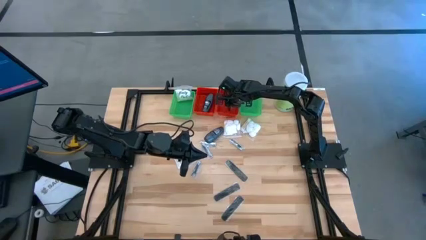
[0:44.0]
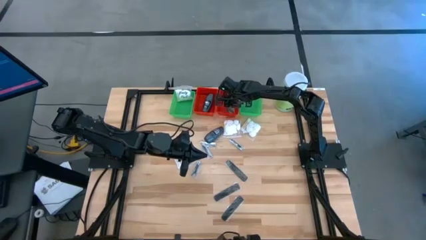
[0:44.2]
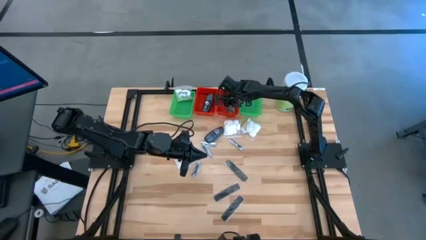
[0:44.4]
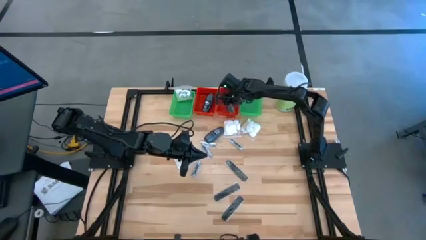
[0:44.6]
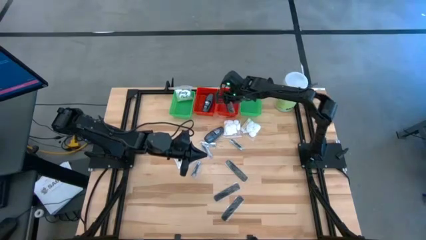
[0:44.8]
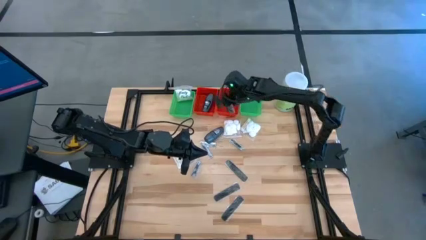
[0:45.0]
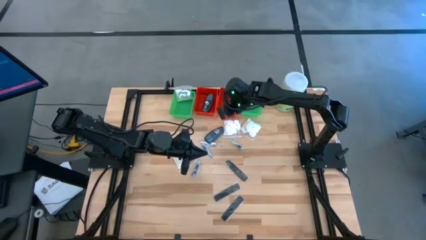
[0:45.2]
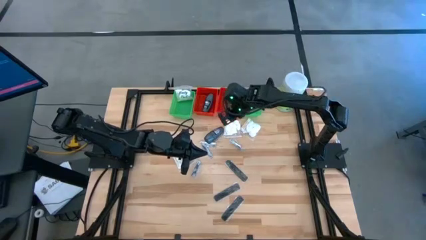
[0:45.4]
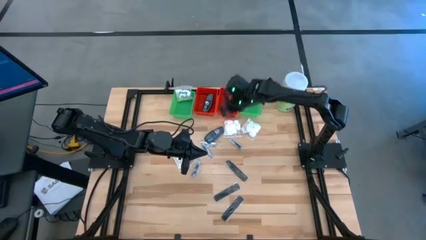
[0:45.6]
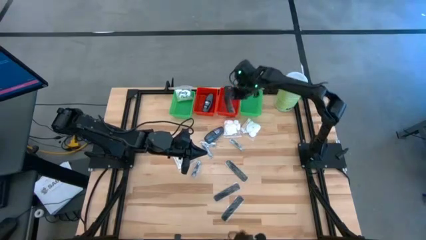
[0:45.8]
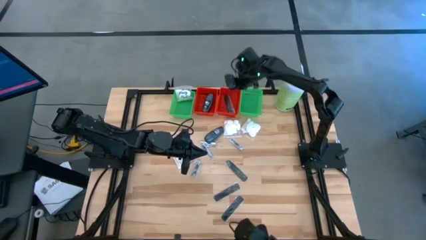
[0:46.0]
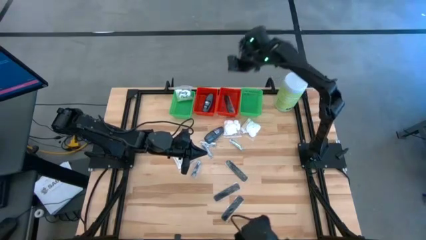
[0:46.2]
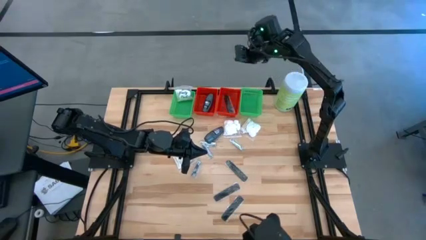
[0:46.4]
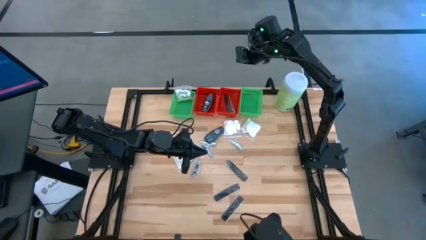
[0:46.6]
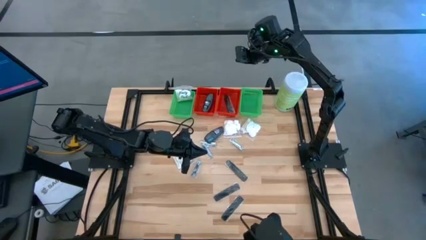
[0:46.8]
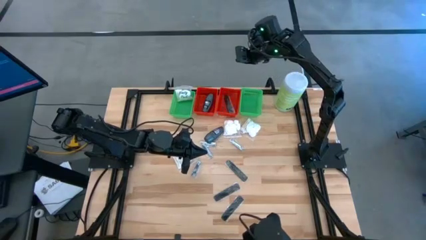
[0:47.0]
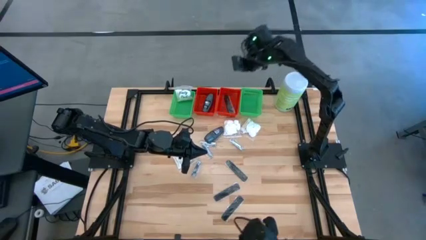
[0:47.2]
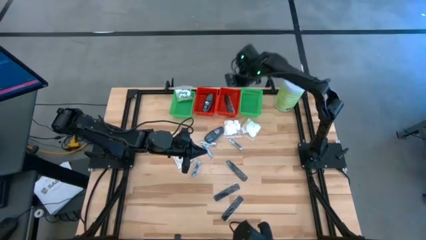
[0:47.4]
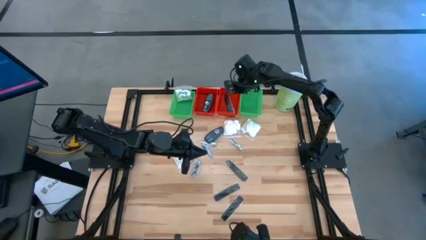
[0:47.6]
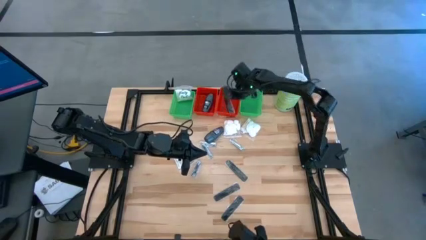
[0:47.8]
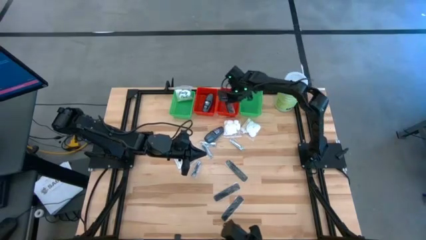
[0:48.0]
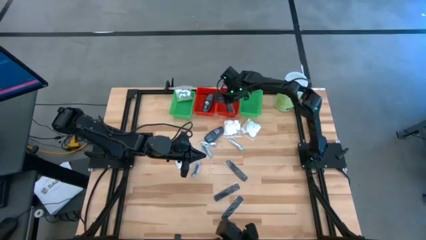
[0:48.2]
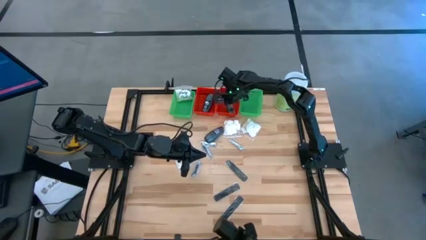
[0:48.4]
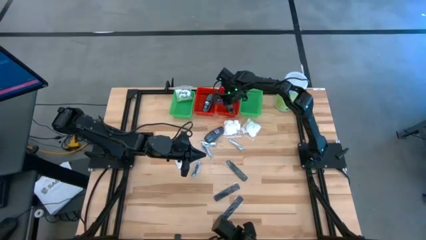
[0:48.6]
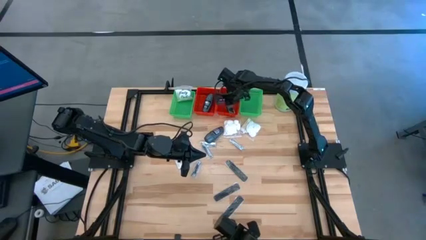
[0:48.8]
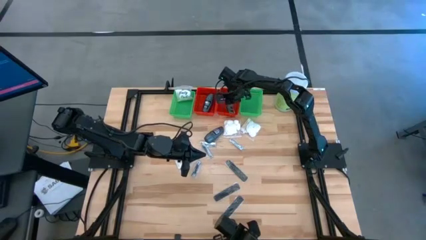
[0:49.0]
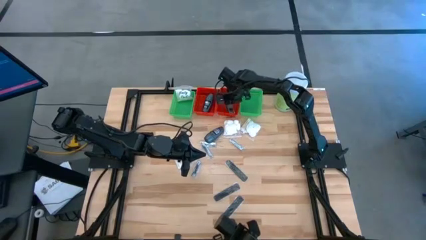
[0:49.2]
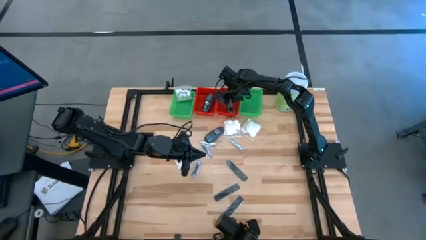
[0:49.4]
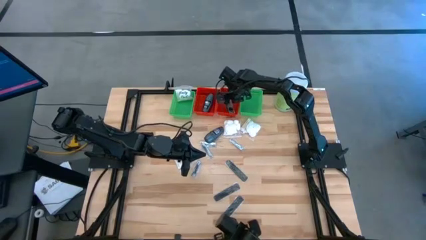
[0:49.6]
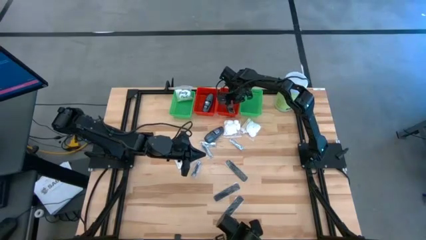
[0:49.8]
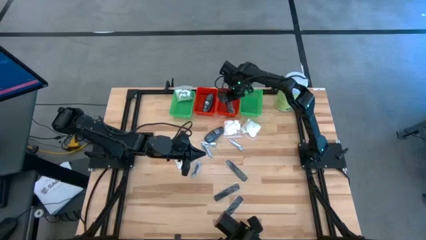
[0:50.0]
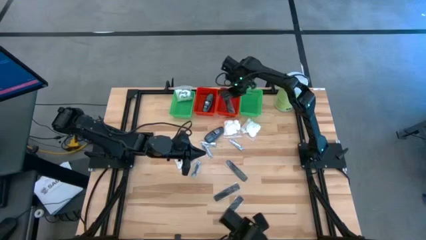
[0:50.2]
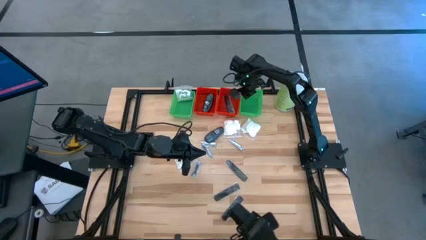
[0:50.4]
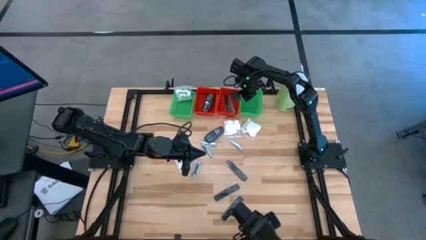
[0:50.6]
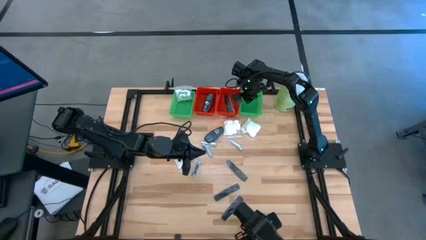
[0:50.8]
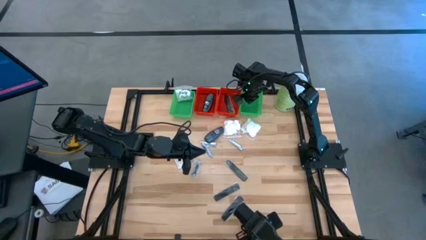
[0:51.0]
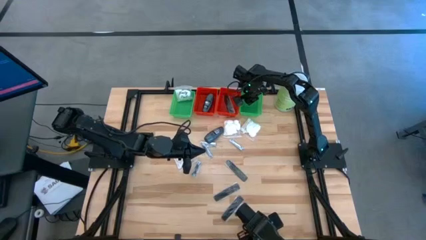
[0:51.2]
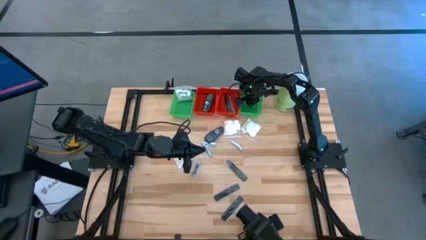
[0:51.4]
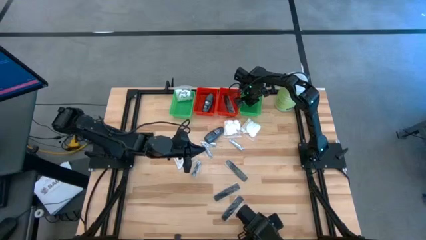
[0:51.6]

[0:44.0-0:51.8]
Task: Pick & Place Travel size toiletries
Adjust the right green basket

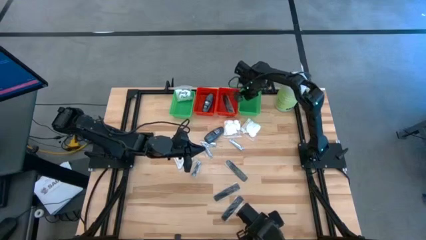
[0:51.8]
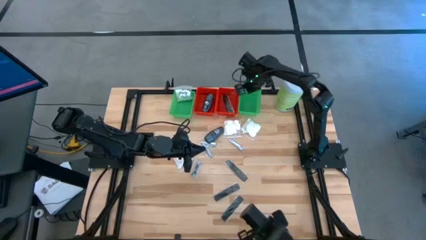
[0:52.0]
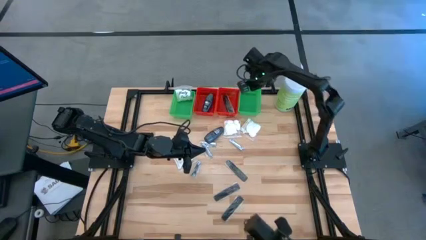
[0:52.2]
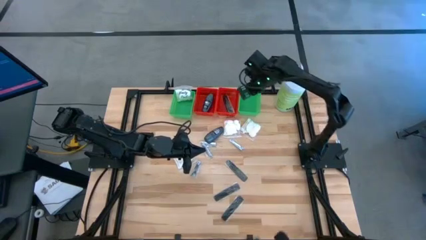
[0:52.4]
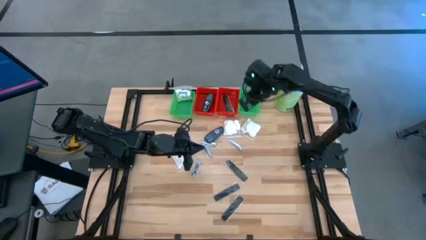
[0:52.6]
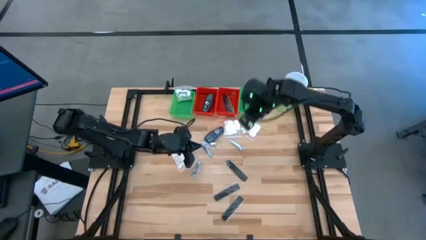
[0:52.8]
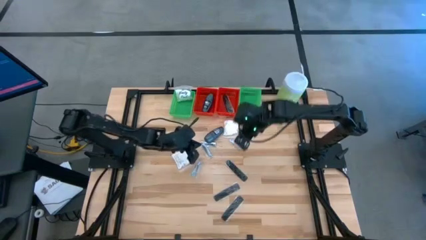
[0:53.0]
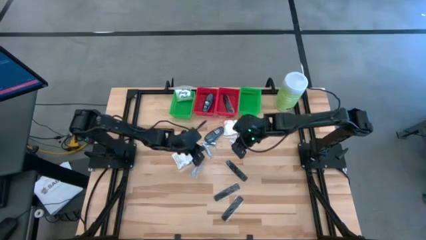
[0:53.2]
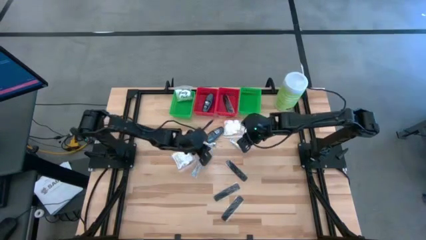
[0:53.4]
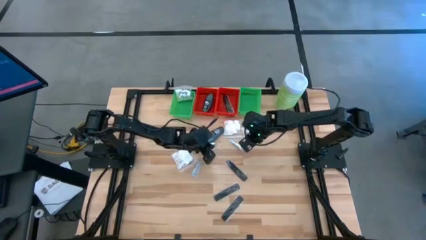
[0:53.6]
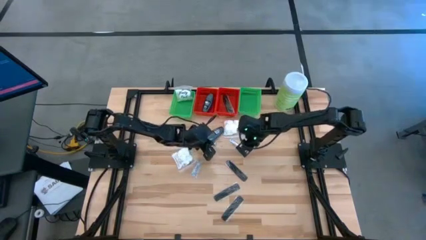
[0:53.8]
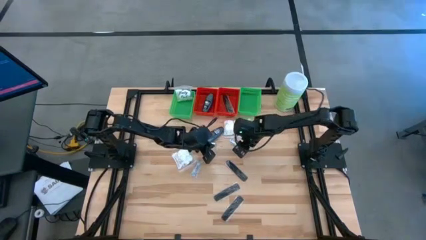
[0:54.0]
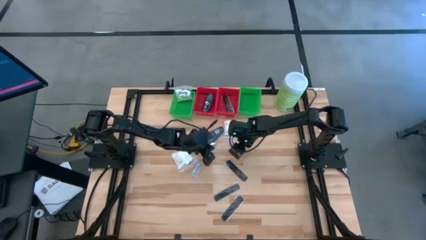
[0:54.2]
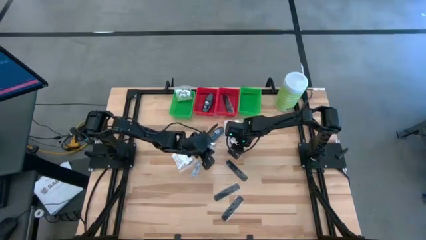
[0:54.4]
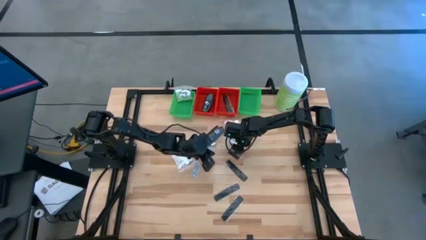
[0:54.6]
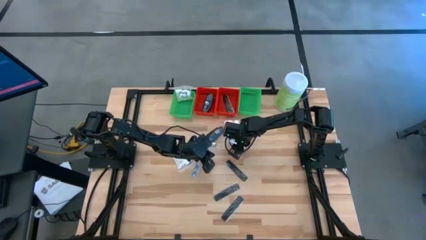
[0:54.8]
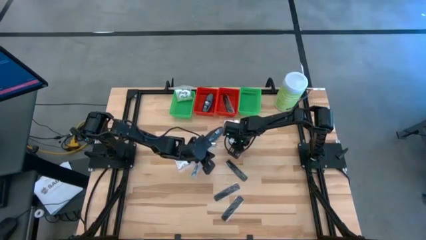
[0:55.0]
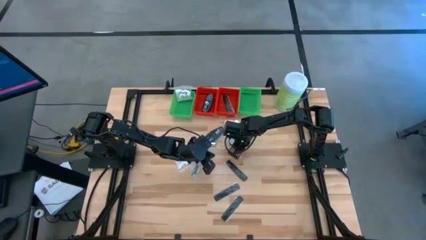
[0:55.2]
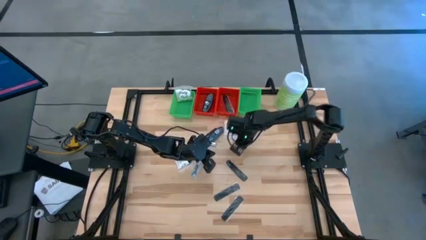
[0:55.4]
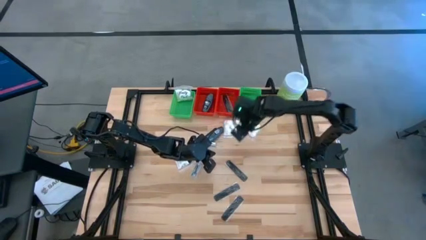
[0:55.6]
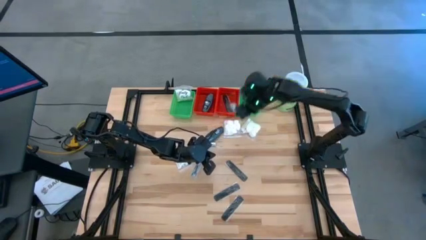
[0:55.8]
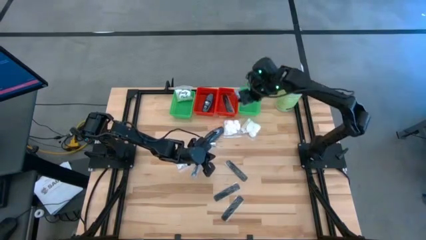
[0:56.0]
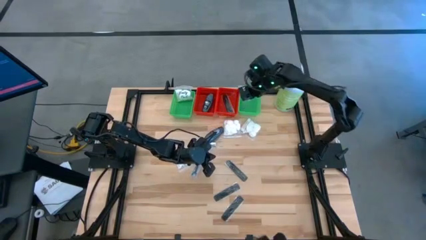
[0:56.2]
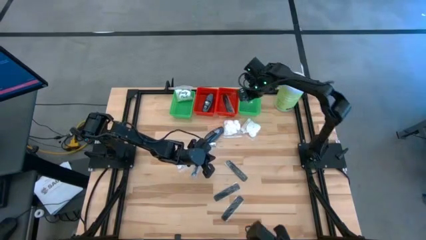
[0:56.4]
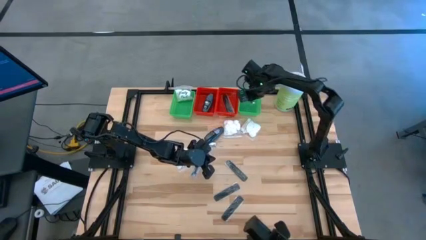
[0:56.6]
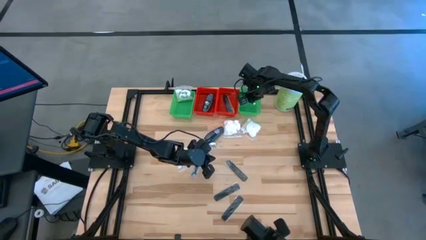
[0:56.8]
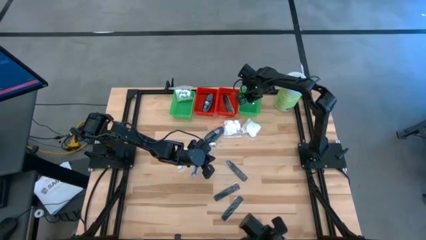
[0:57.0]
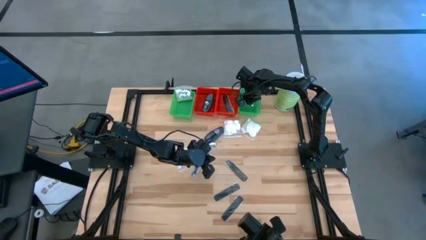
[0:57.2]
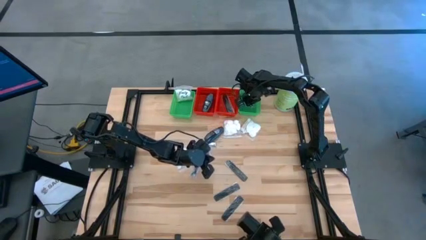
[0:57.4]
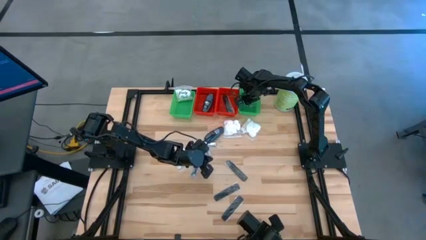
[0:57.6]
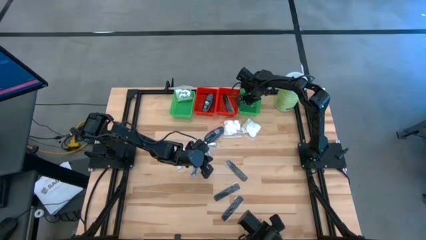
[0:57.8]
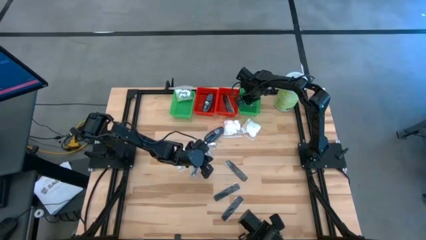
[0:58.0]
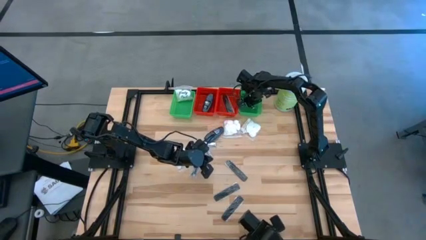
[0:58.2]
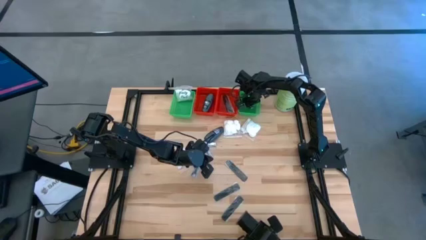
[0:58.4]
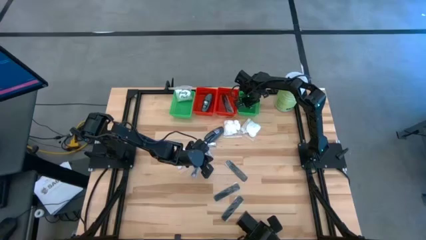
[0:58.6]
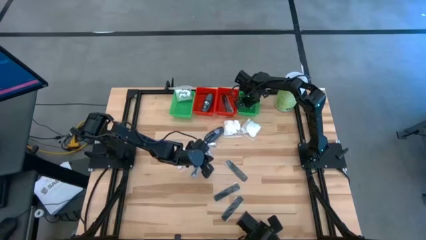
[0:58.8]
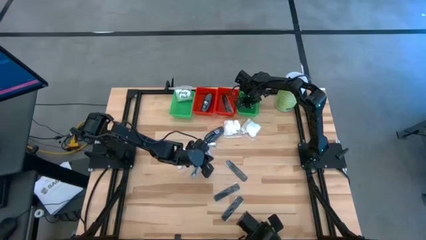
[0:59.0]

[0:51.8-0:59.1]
Put the nail cutter into the right green basket

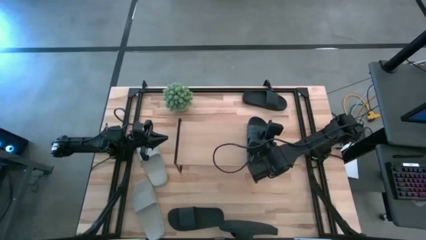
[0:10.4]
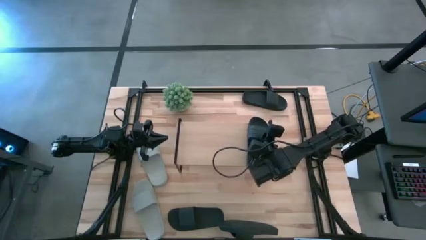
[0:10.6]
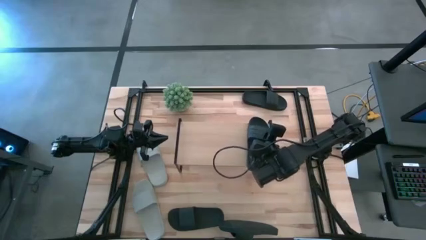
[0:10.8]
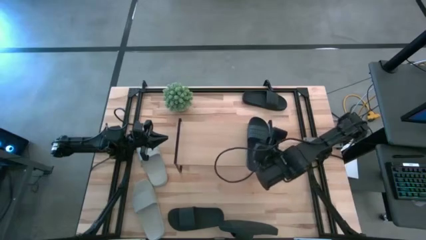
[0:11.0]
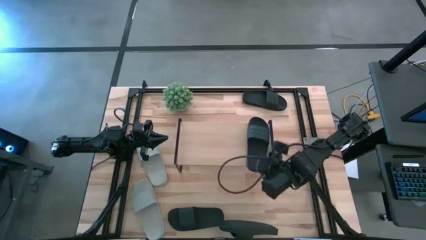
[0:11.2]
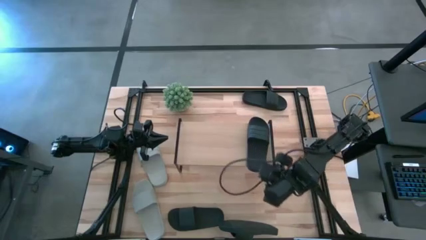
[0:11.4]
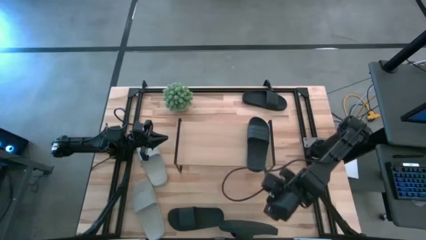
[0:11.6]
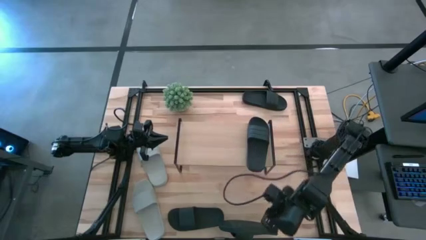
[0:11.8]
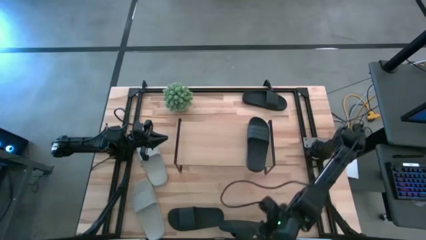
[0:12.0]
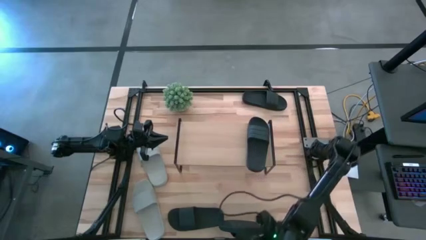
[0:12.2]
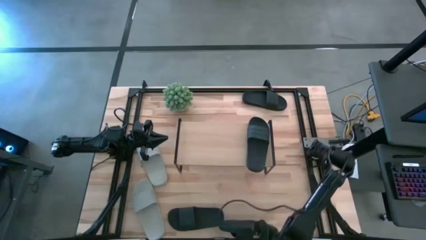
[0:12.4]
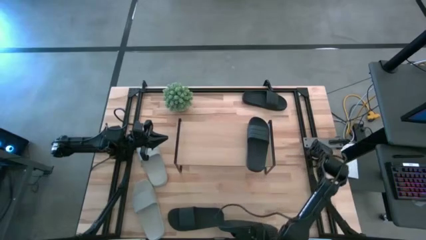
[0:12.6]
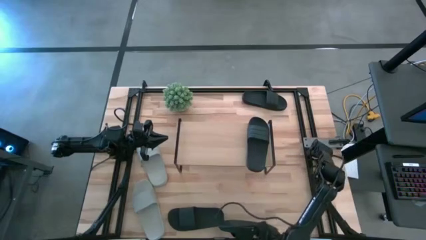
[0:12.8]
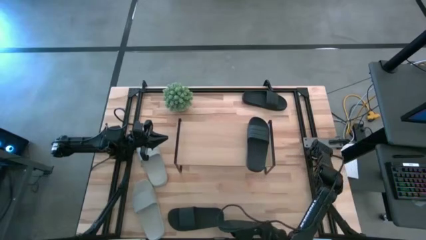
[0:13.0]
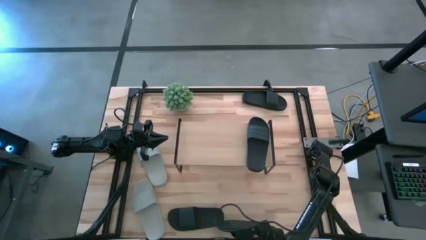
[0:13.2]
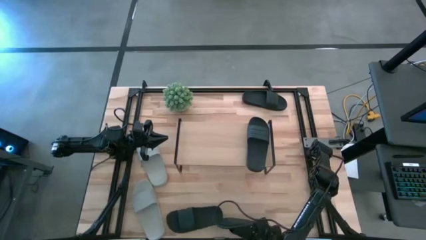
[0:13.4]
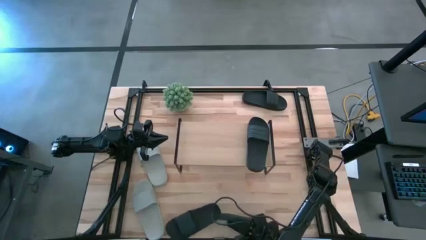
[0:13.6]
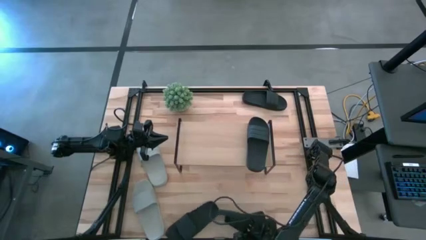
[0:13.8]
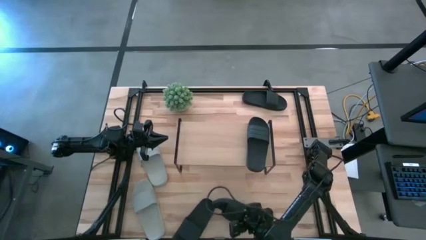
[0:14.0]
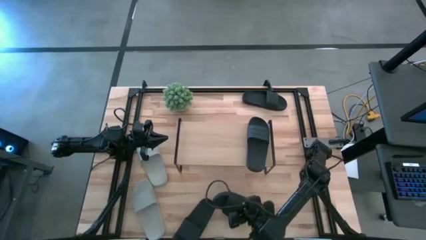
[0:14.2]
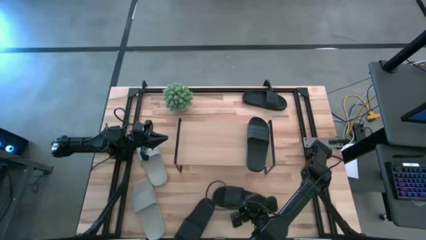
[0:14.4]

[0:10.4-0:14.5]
Task: Pick and place slides into the shelf
Adjust the black slipper
